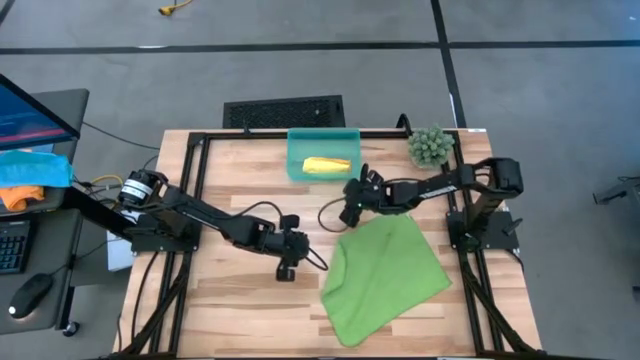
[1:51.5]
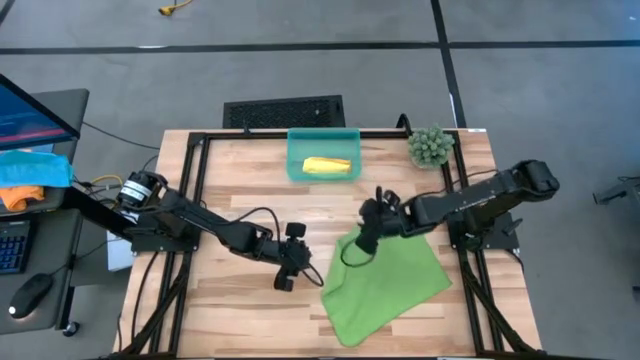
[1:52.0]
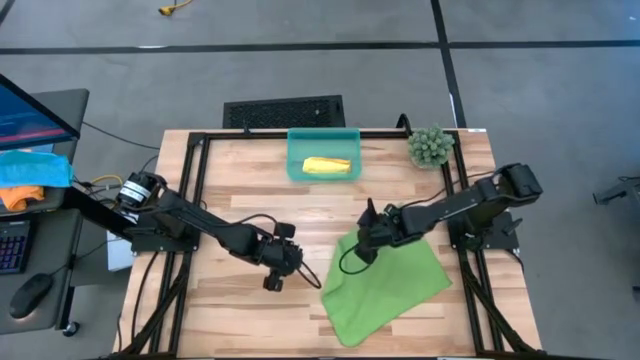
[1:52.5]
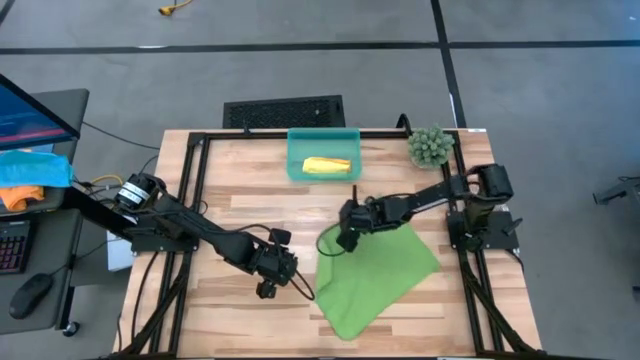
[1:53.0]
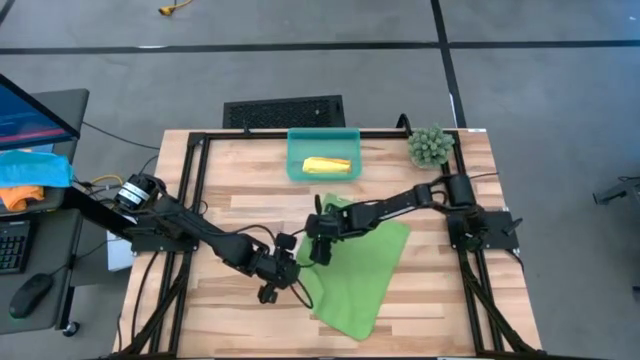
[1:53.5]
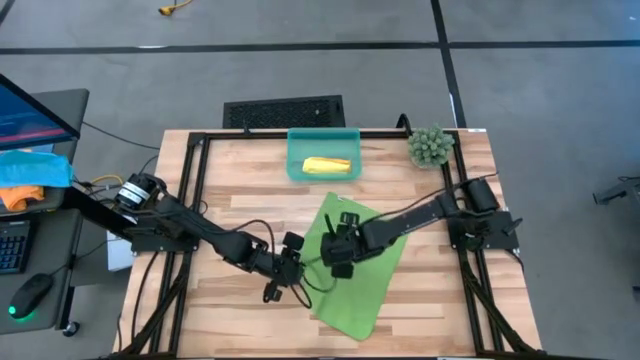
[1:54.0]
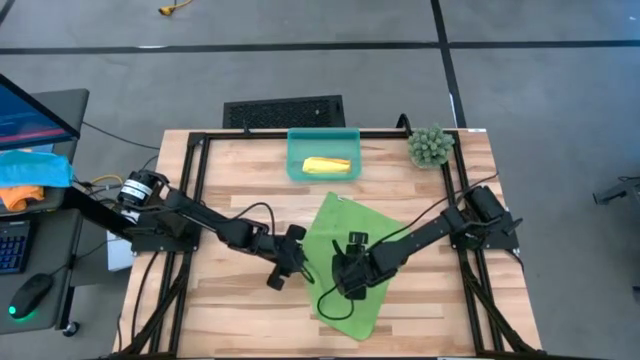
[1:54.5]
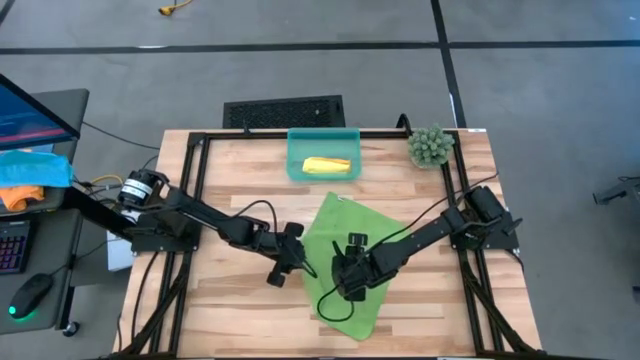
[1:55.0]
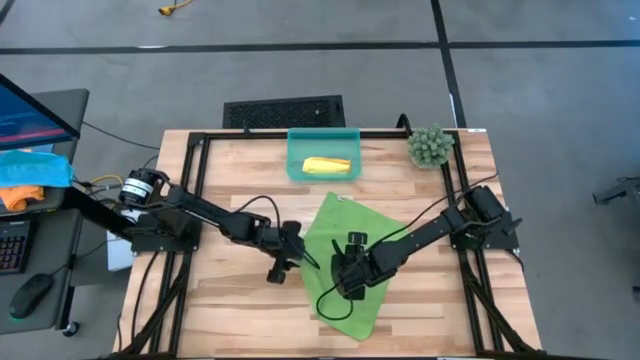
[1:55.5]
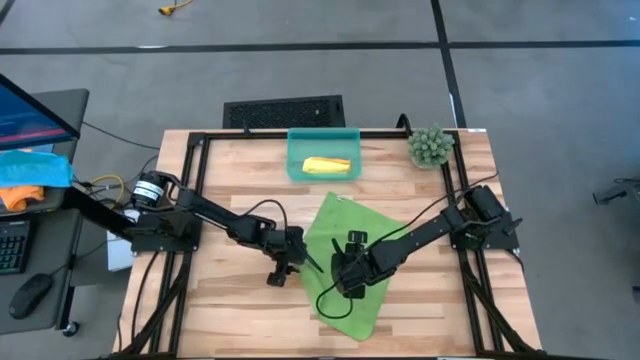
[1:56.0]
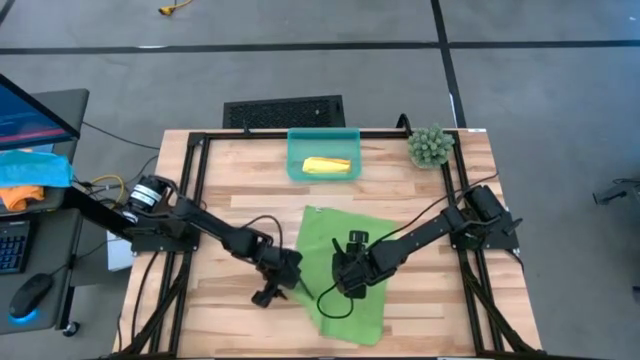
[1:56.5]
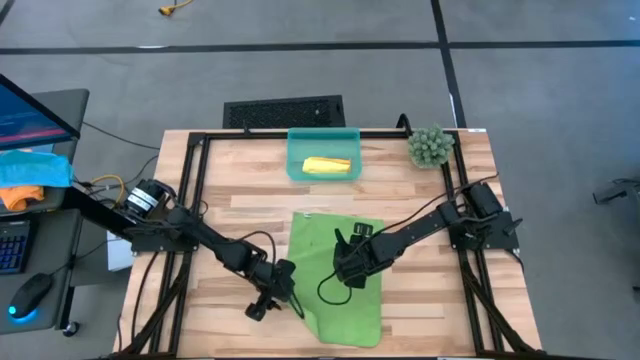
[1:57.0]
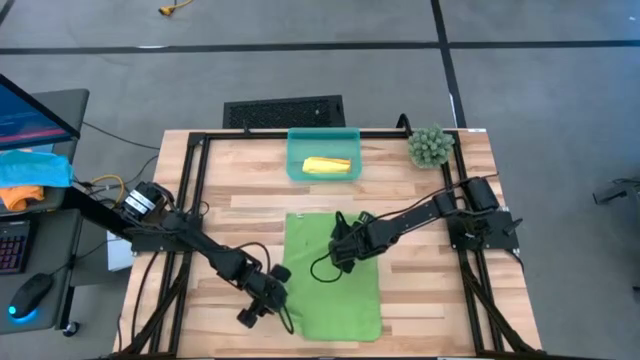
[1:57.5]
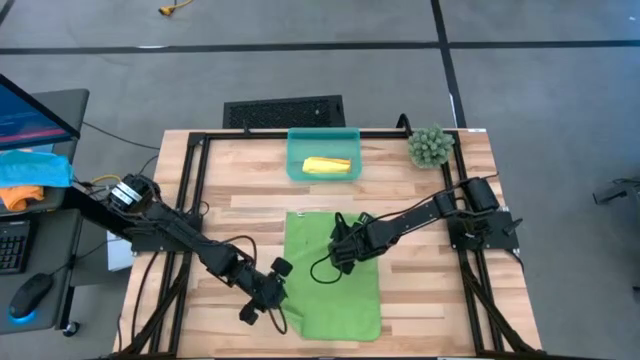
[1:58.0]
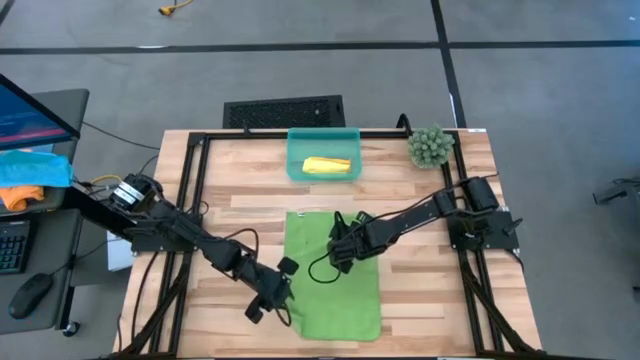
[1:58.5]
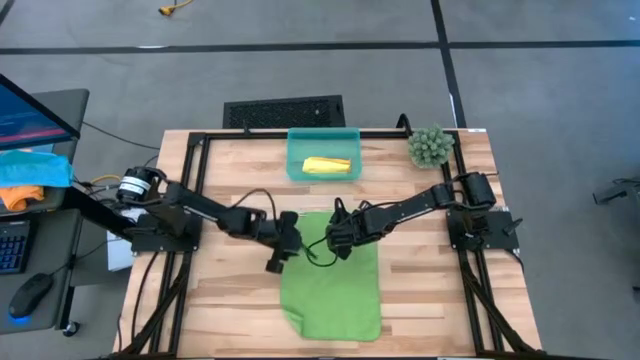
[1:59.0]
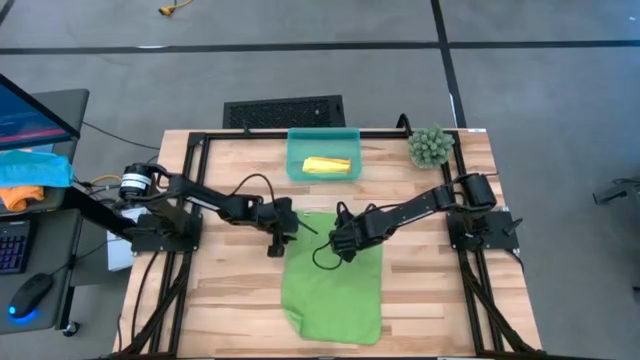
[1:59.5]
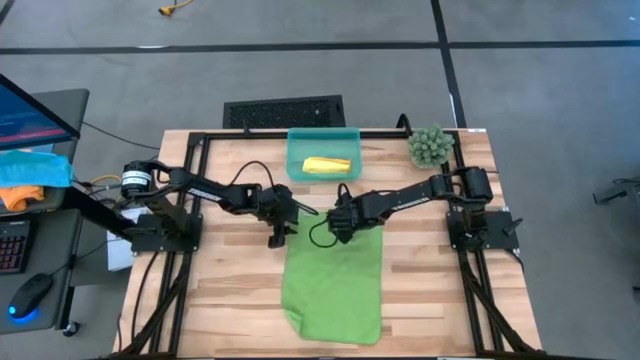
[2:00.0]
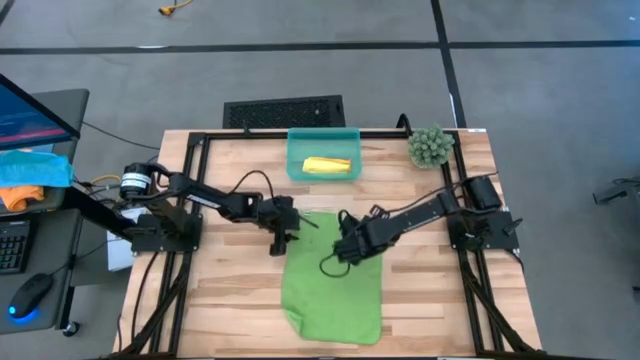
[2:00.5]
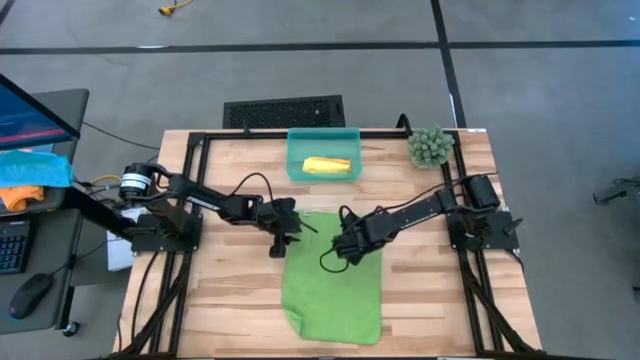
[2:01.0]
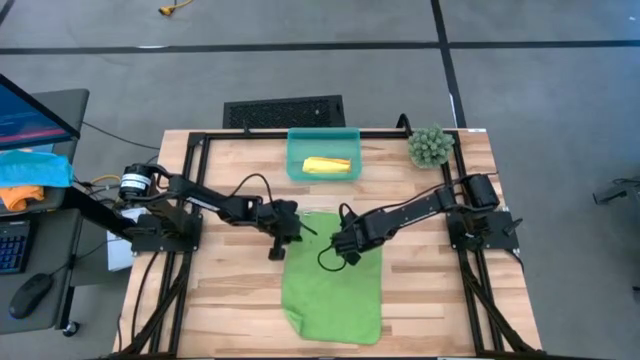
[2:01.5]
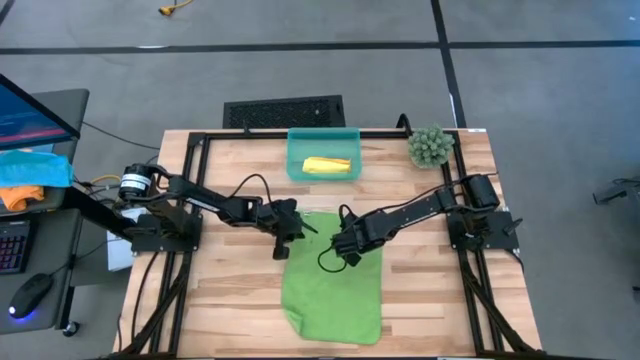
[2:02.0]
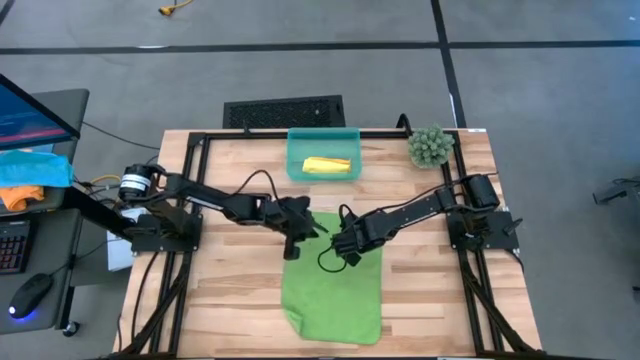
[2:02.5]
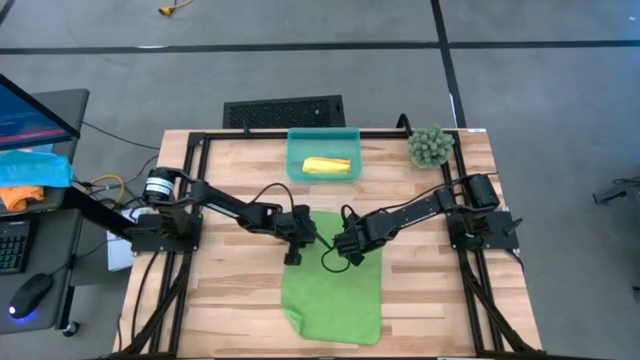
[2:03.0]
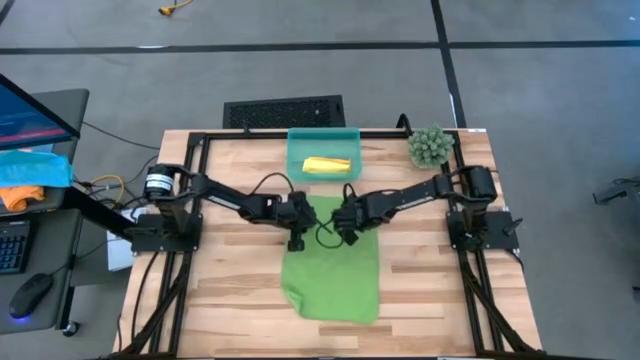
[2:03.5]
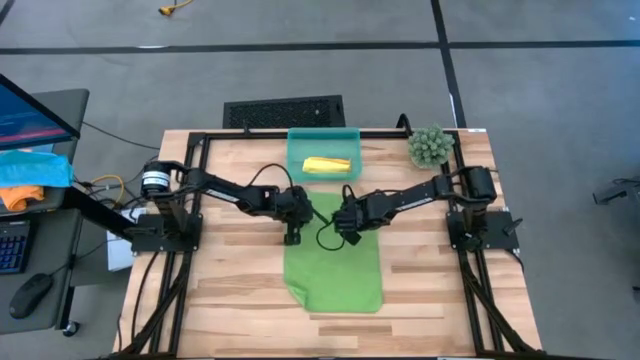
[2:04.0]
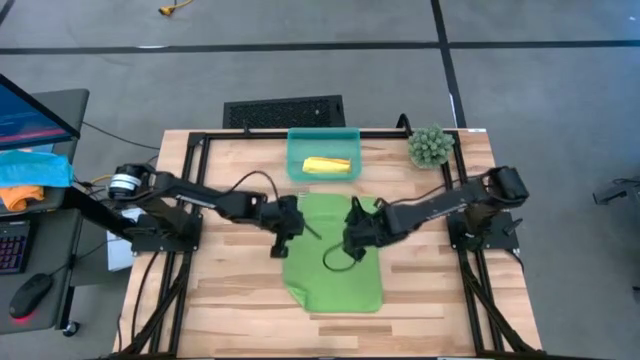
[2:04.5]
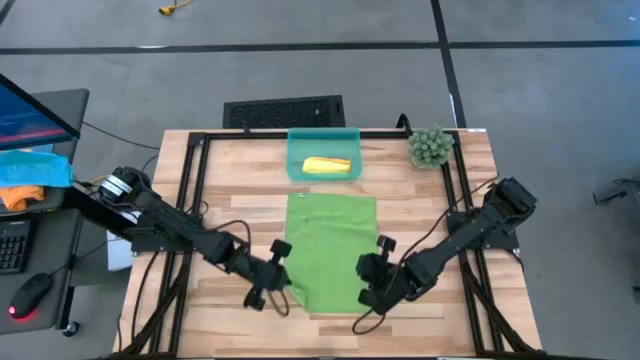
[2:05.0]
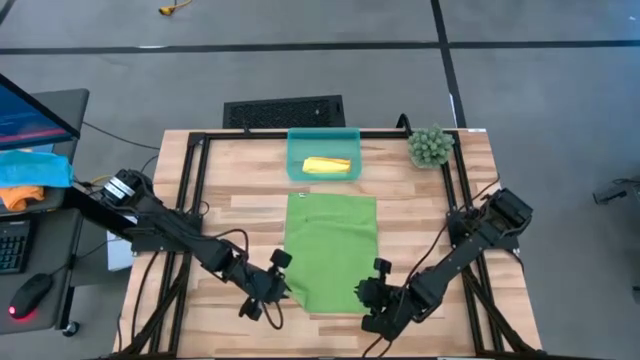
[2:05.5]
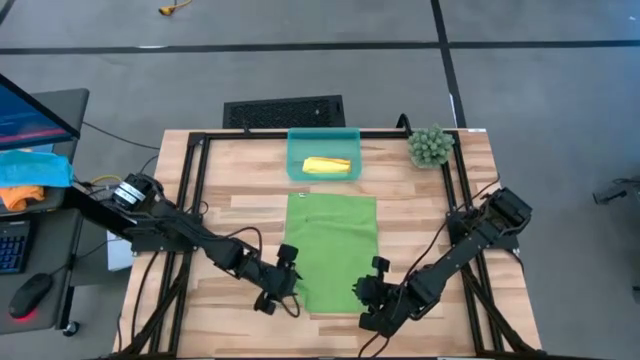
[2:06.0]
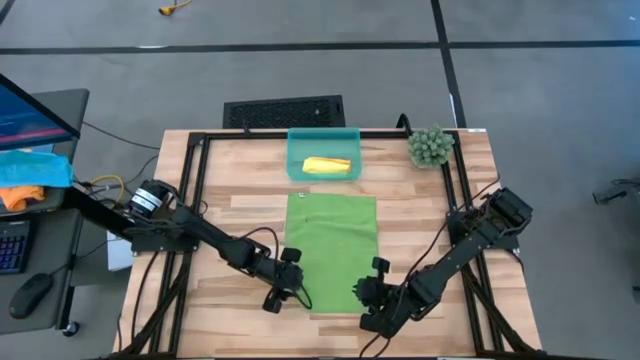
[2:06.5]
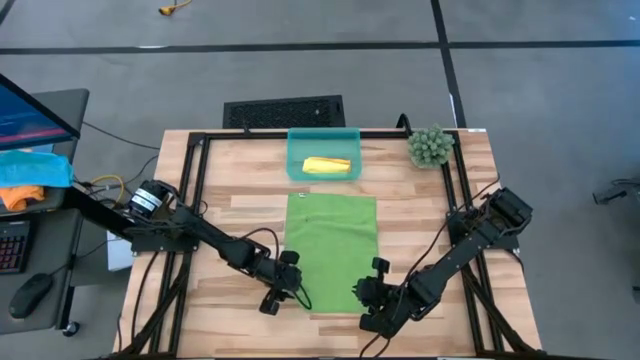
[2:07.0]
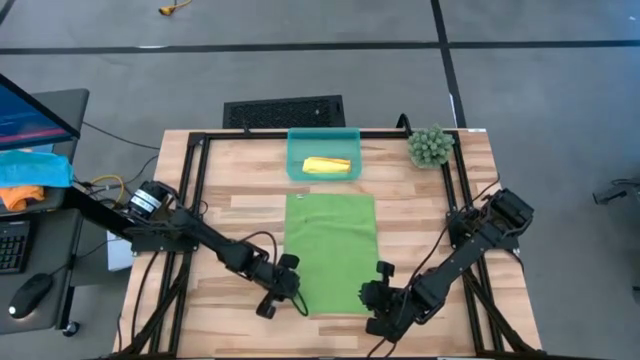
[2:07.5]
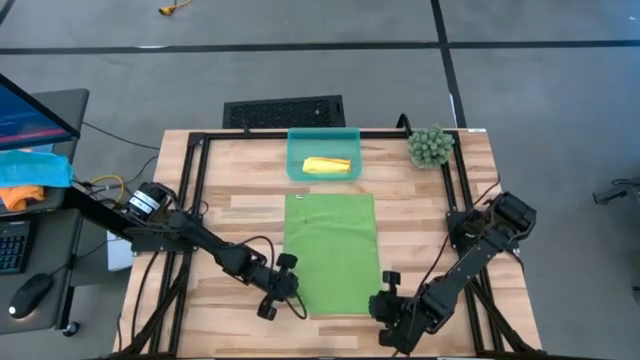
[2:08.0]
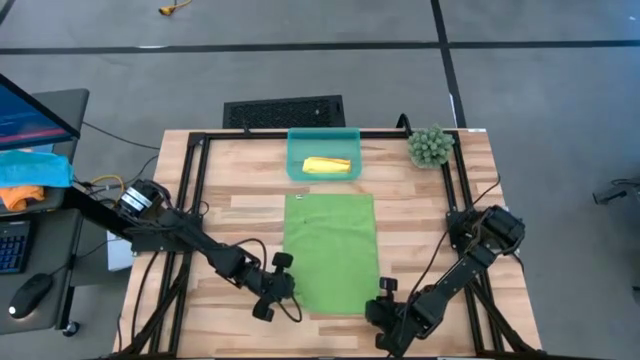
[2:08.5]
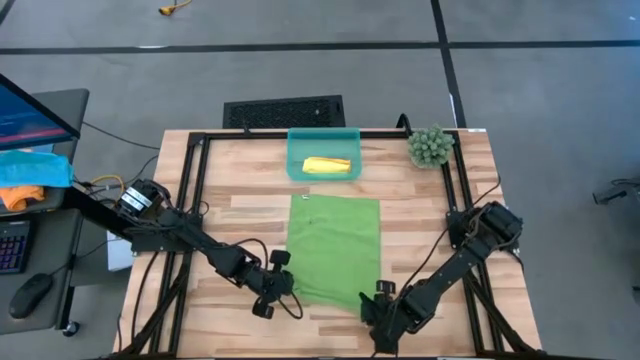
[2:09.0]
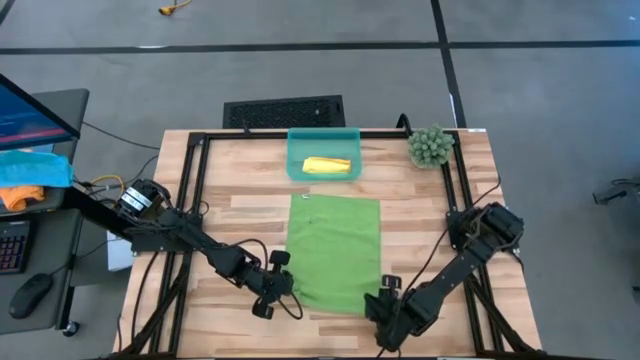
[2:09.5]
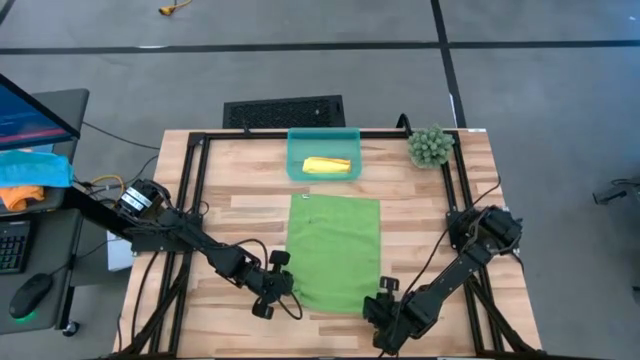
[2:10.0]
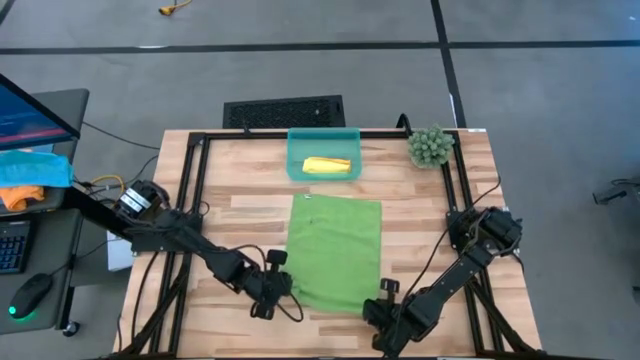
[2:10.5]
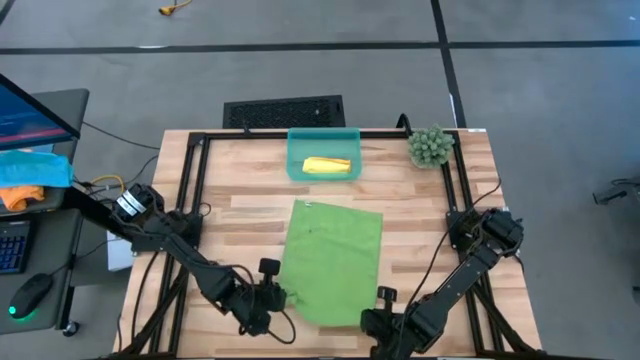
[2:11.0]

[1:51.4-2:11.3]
Task: Roll microfiber towels into tight, uniform cylinder then place into a basket
Fold the green microfiber towel

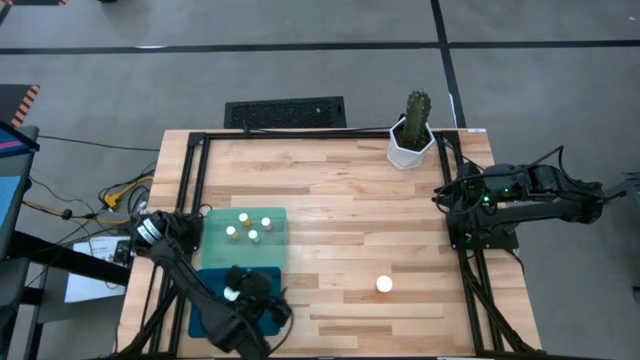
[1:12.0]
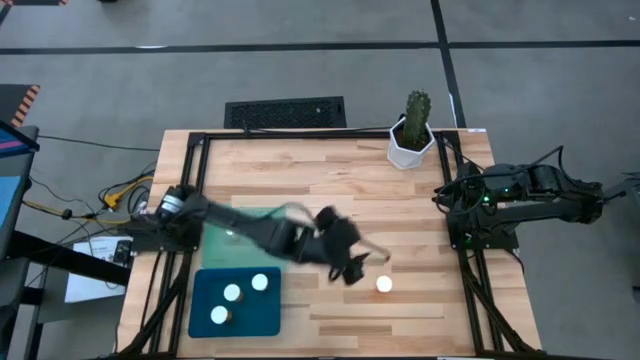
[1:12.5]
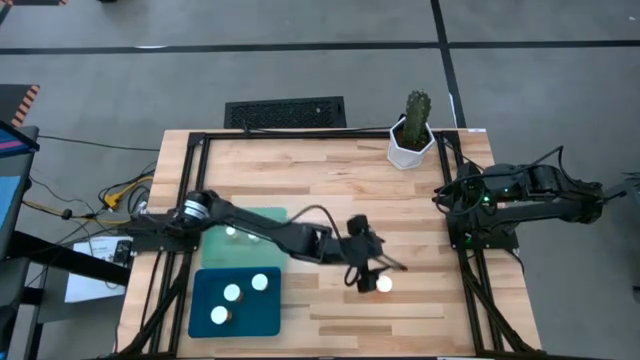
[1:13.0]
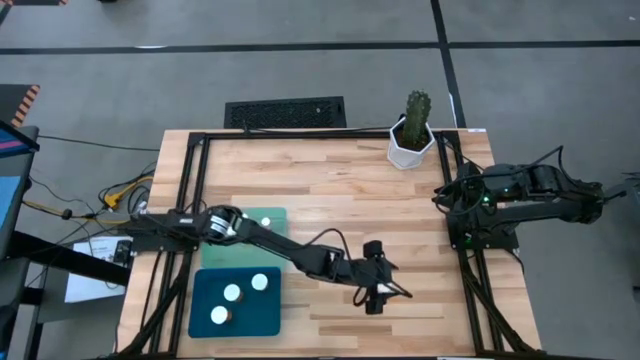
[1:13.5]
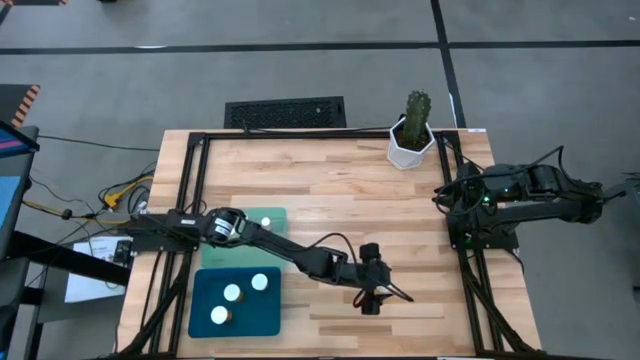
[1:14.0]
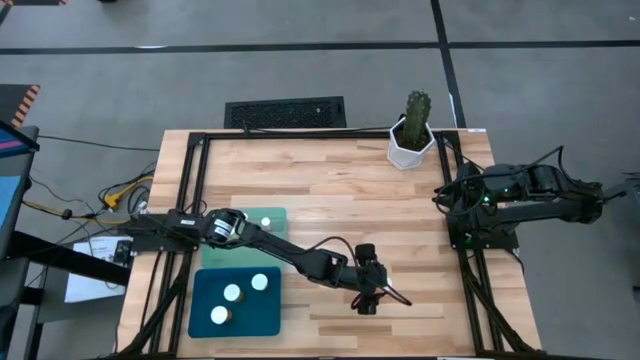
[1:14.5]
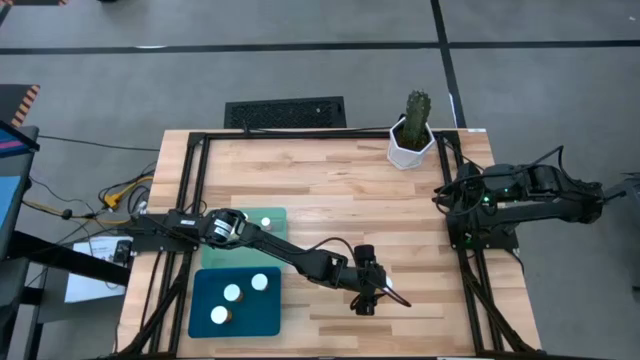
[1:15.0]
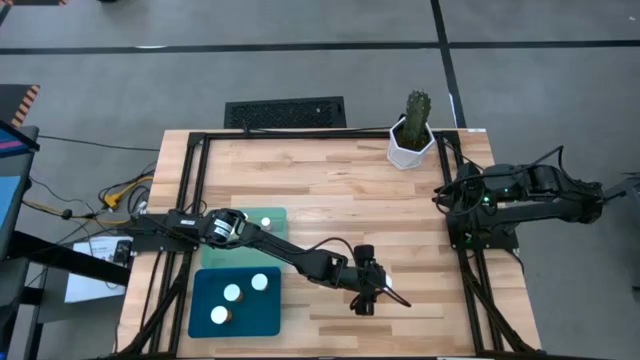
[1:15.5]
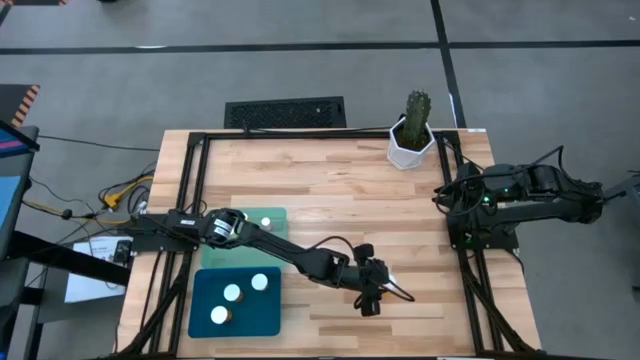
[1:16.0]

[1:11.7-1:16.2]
Task: Pick and place medicine bottles into bin by pill shape (circle, oval)
Put the big orange pill bottle into the blue bin
